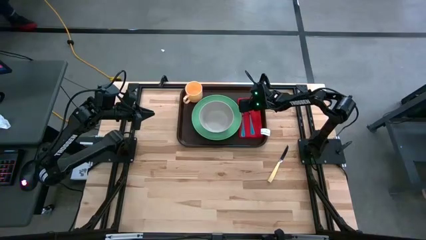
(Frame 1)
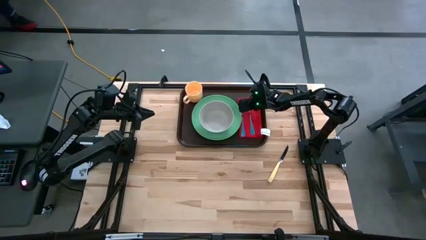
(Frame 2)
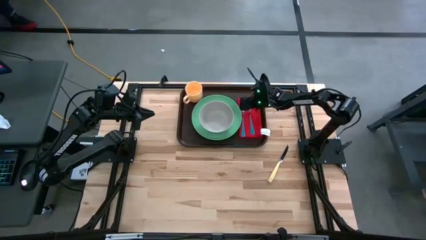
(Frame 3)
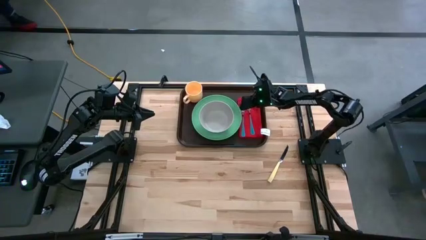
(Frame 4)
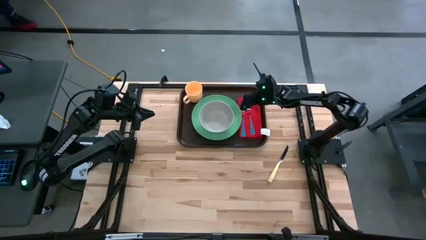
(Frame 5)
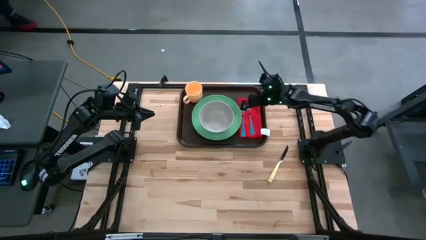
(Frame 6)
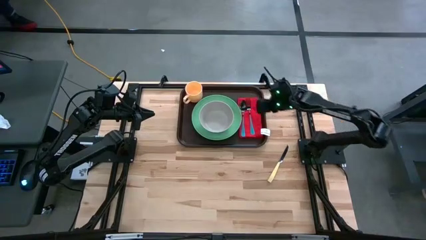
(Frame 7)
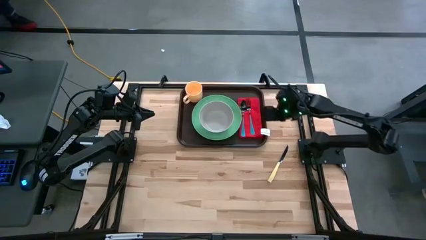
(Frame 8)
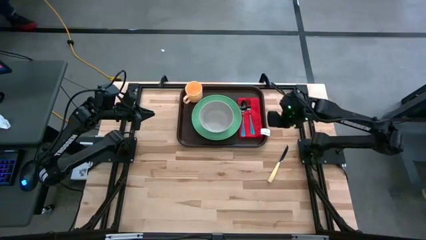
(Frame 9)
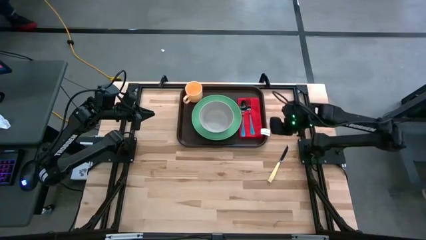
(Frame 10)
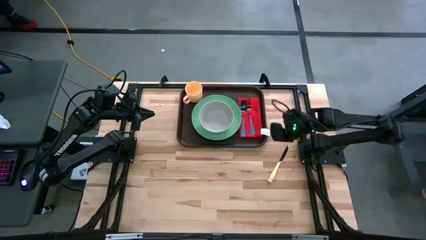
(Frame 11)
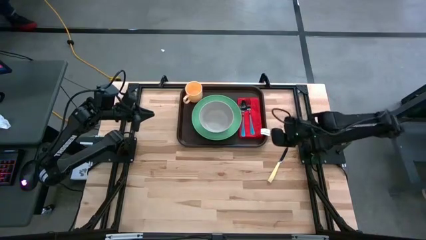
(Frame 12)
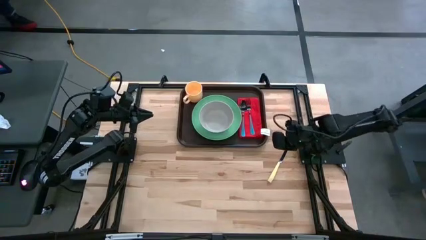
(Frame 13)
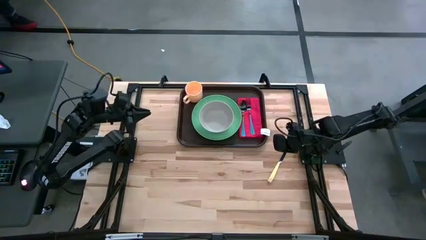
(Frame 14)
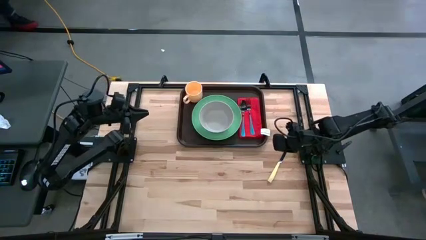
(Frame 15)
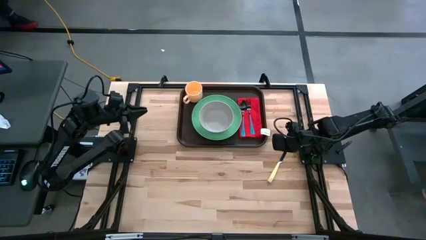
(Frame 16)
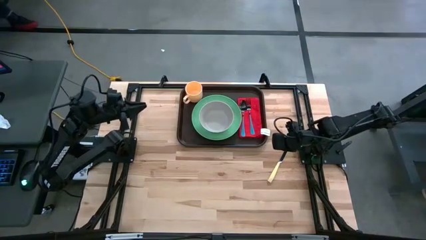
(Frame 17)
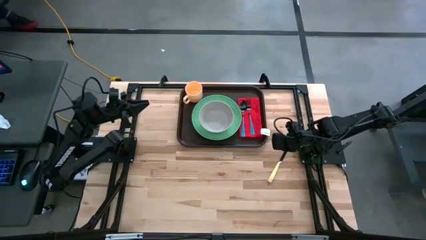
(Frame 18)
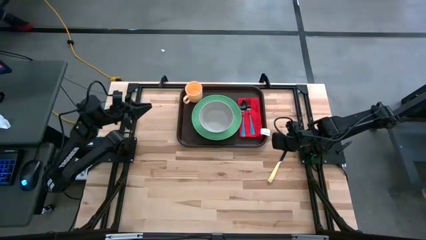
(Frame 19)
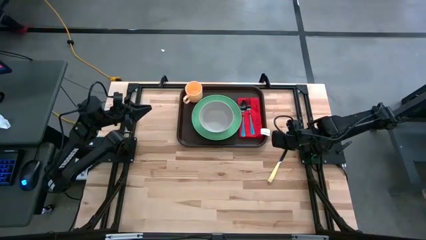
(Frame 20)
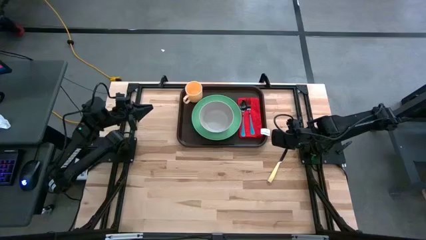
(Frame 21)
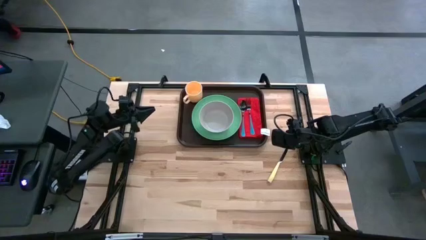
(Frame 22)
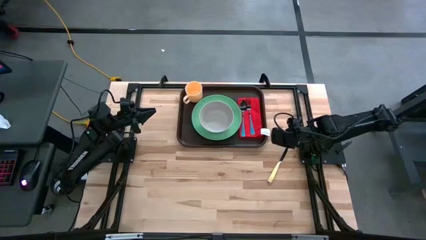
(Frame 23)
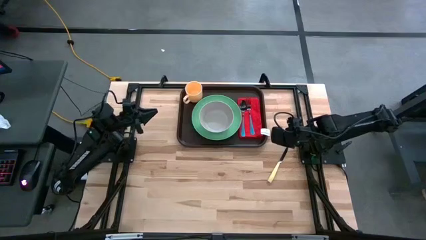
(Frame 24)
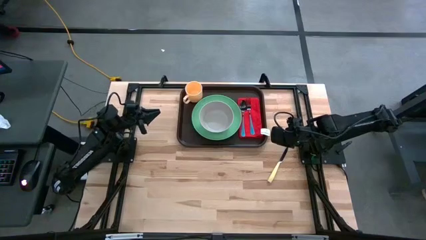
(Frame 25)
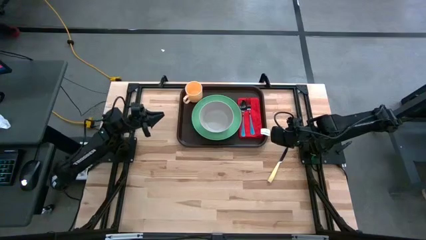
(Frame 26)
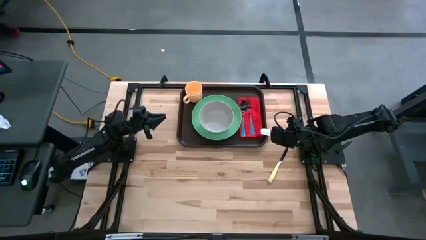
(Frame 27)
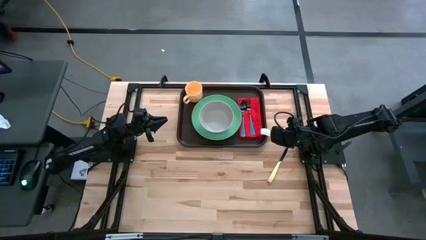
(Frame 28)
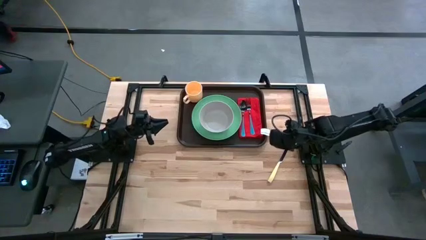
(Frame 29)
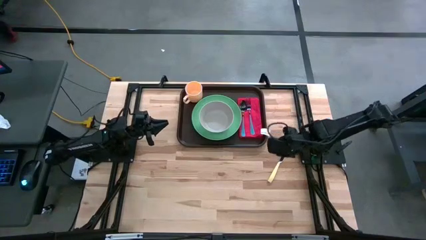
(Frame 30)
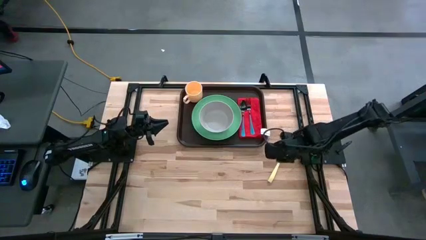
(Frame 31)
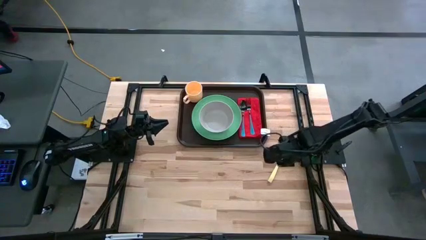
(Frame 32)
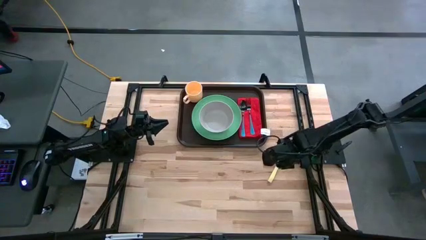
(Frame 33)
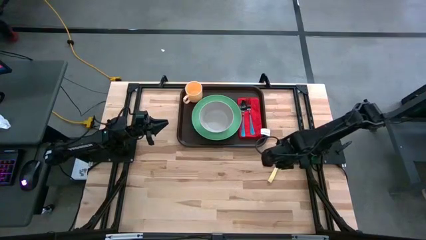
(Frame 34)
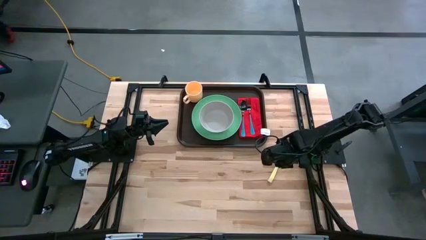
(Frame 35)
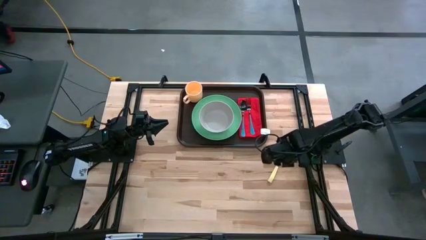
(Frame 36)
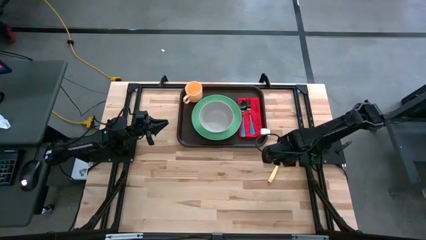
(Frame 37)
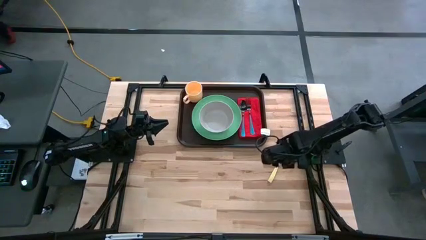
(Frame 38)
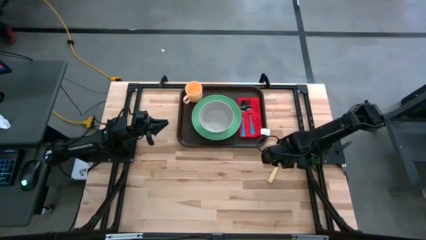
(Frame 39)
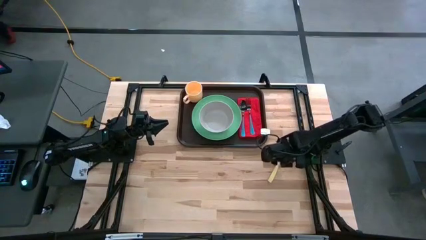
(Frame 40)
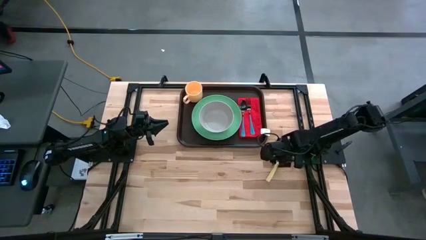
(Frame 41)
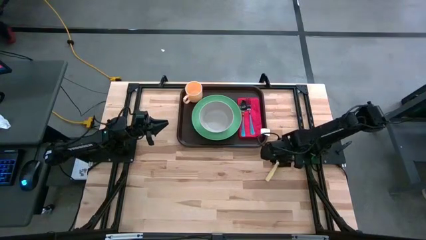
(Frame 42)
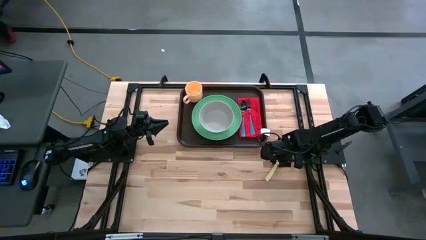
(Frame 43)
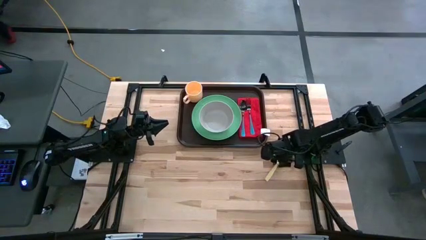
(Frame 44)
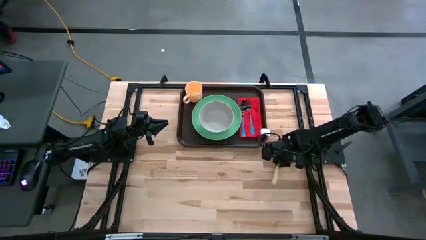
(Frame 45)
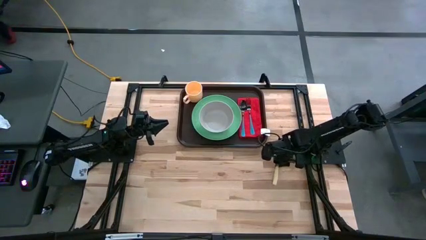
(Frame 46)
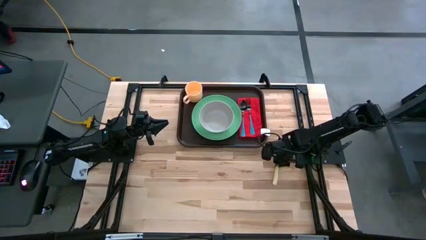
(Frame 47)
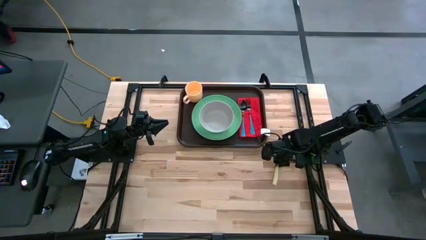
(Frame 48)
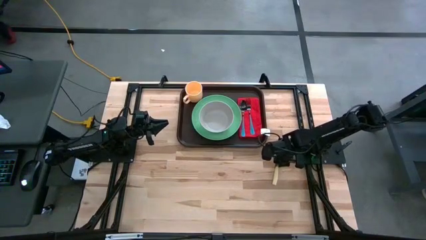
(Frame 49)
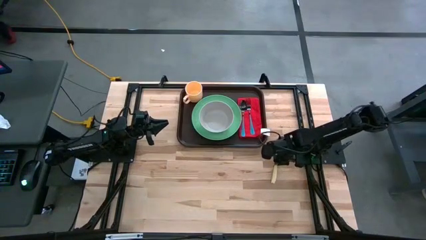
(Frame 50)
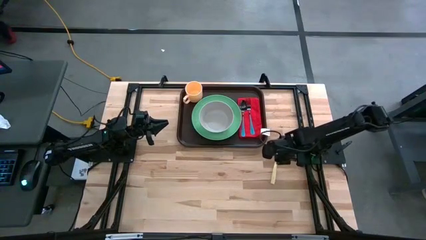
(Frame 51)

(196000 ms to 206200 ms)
Task: Set up tray
Put the yellow table knife on the red table napkin to the right of the blue fork

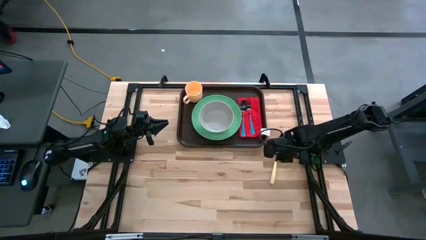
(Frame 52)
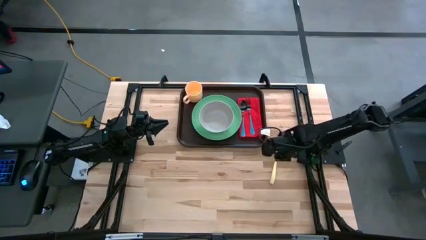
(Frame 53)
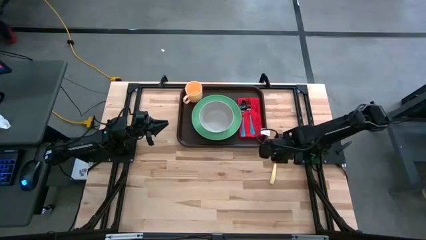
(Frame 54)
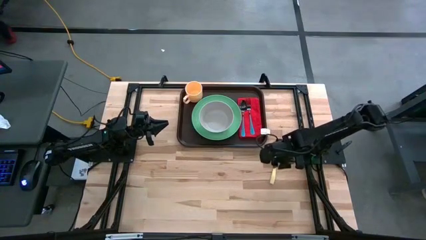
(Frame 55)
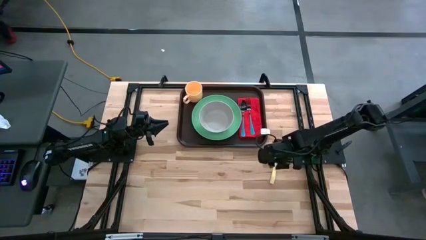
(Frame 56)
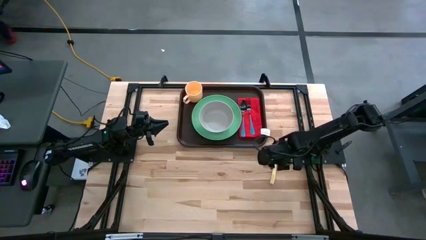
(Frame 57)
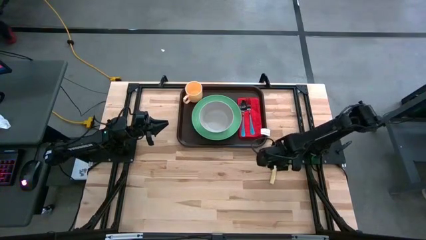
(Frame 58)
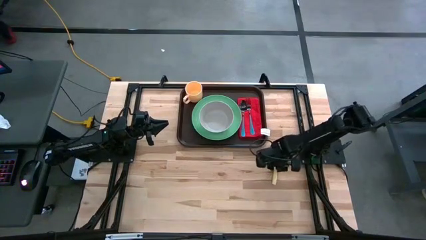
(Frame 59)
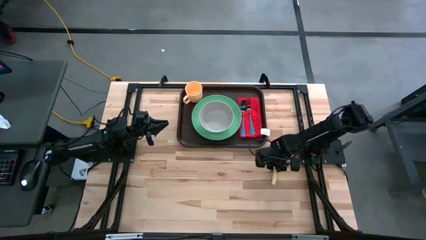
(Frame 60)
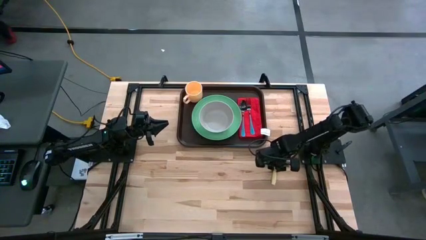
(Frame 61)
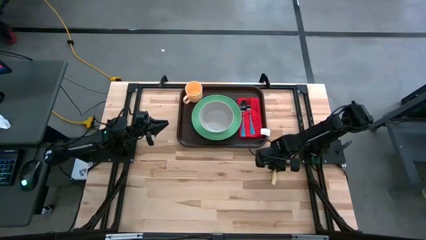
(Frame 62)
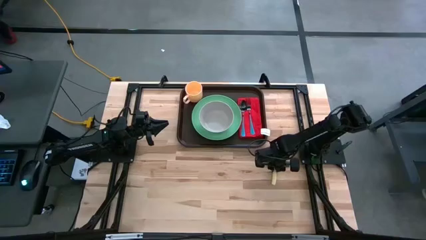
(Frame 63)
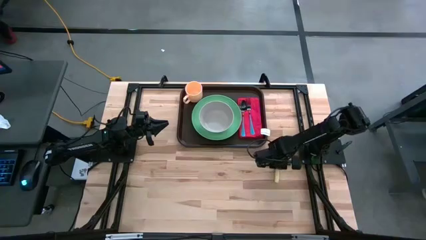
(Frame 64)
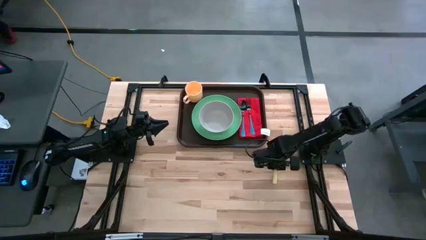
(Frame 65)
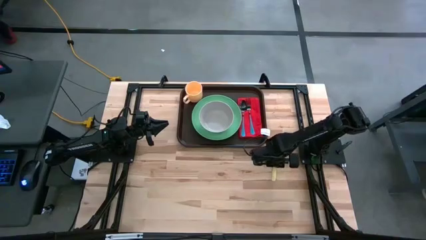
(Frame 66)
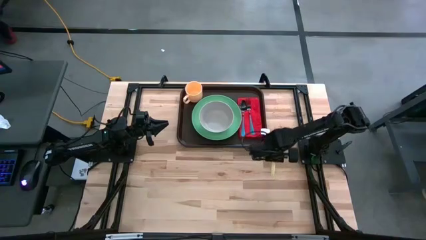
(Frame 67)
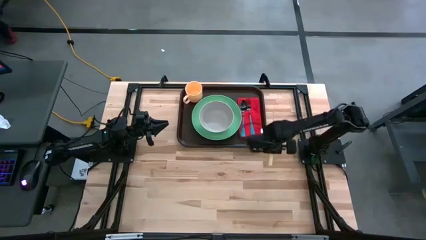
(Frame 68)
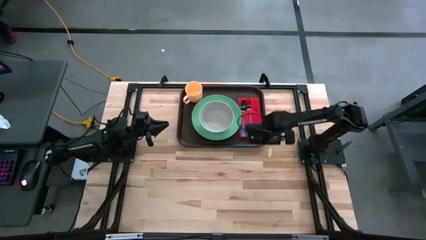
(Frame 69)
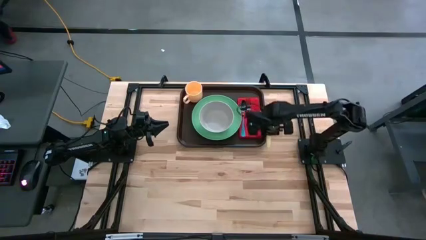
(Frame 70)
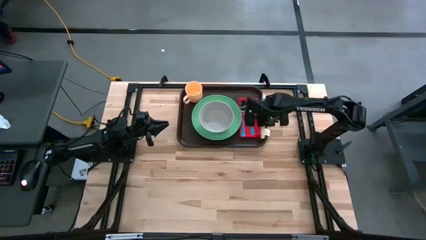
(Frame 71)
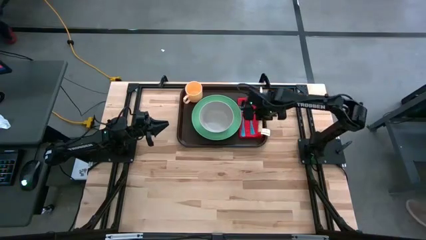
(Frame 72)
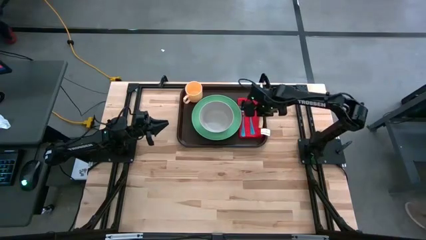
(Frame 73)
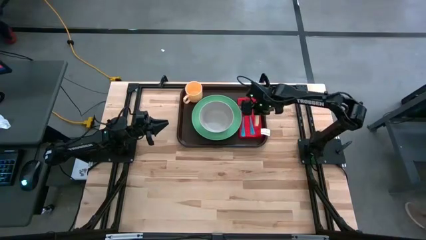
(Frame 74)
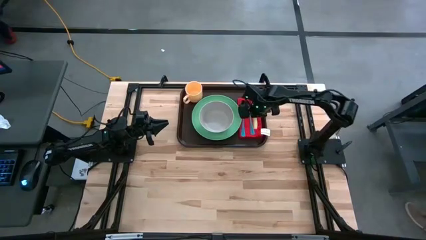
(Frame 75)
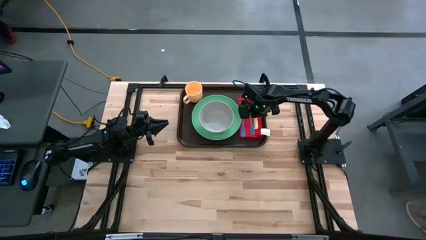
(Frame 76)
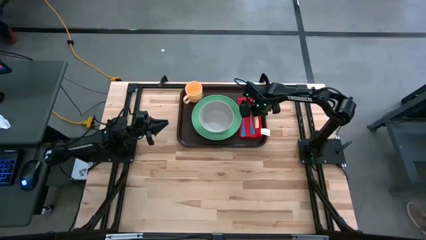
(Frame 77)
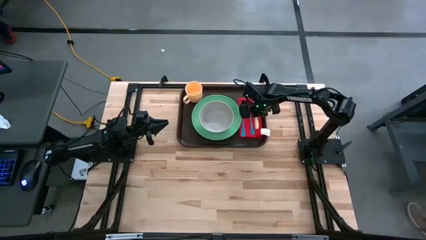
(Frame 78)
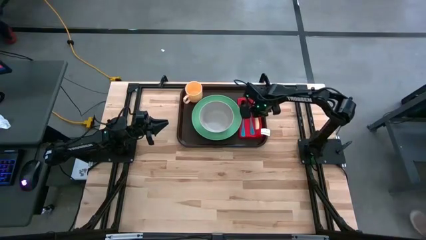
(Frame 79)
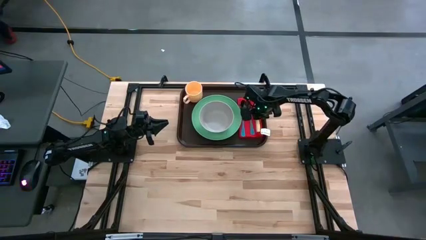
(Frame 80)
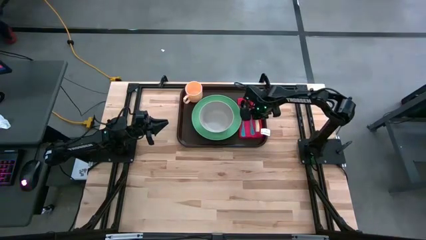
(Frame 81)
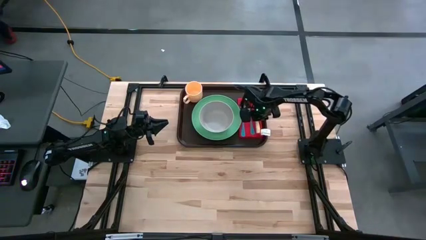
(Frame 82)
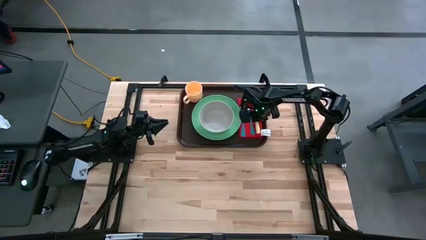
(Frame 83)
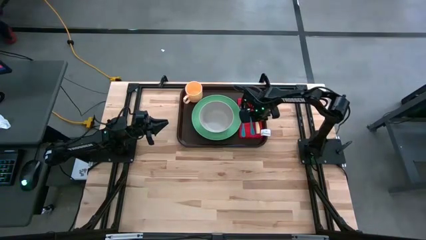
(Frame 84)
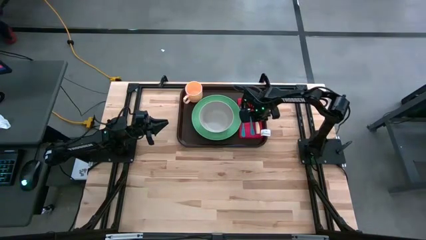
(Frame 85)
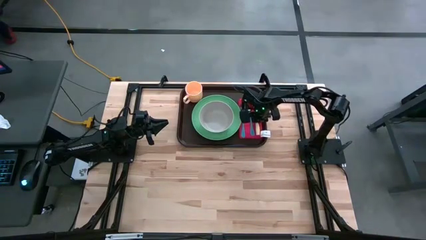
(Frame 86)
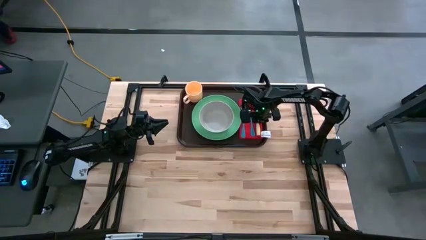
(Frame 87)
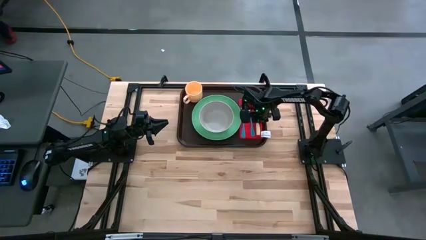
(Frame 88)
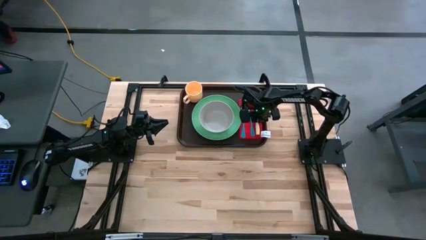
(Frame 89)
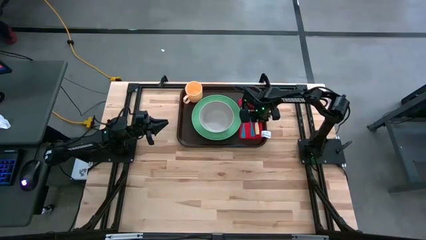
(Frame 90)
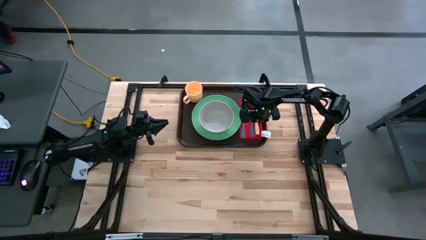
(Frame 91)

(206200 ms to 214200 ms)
Put the yellow table knife on the red table napkin to the right of the blue fork
